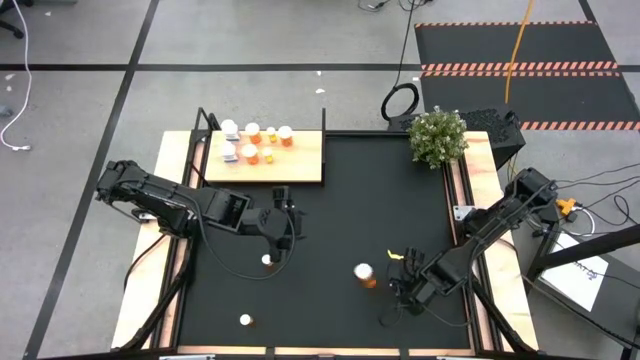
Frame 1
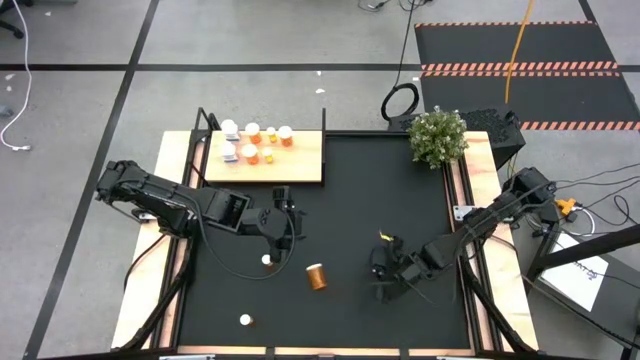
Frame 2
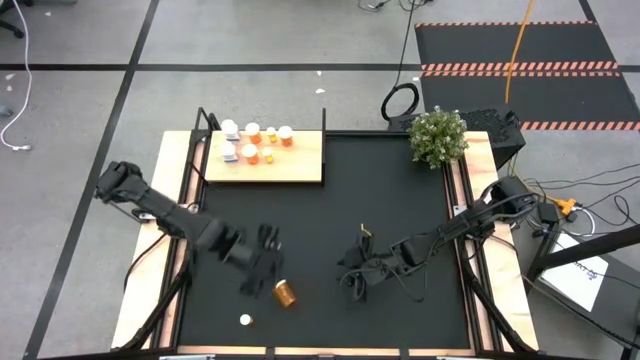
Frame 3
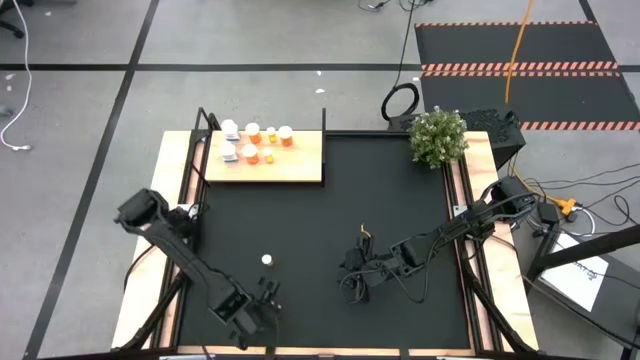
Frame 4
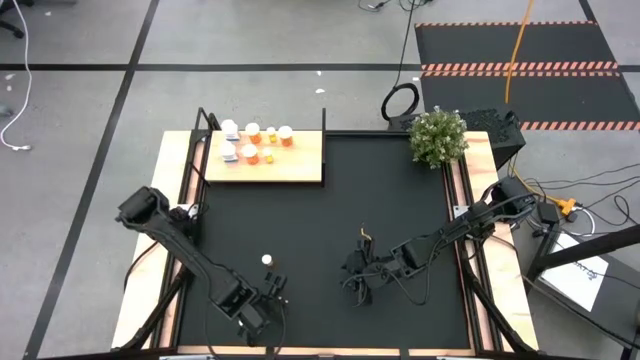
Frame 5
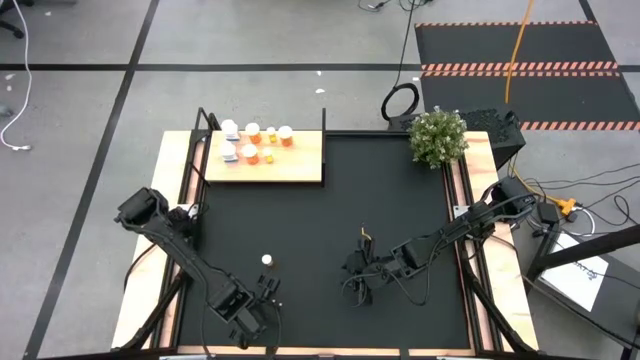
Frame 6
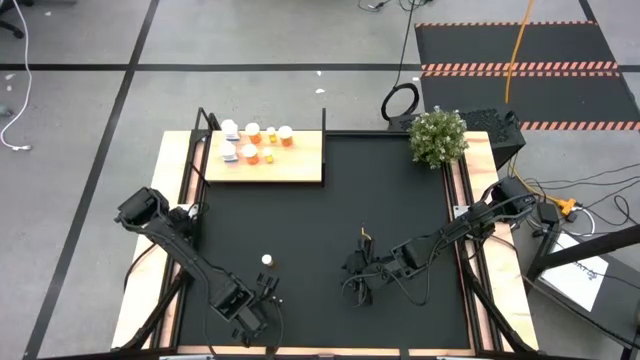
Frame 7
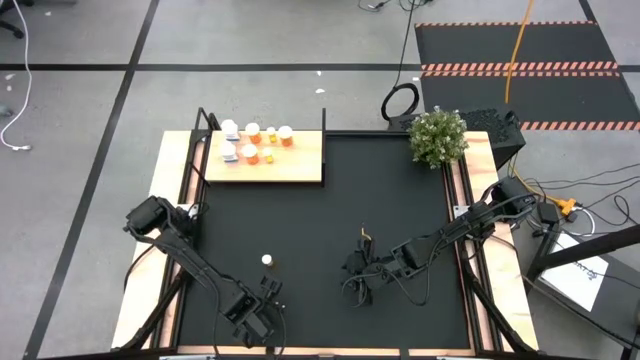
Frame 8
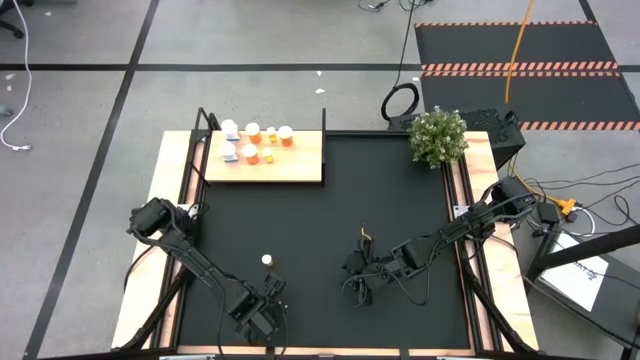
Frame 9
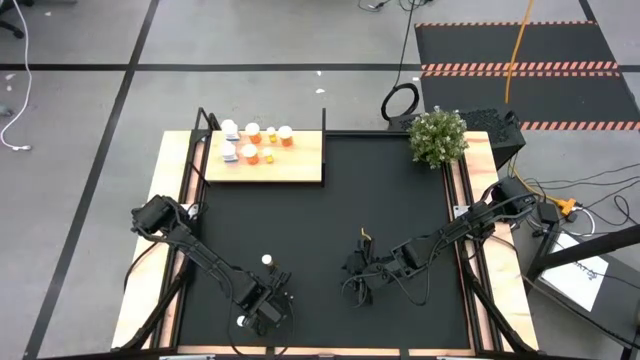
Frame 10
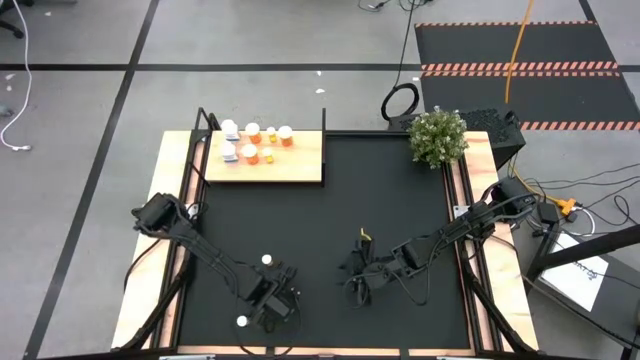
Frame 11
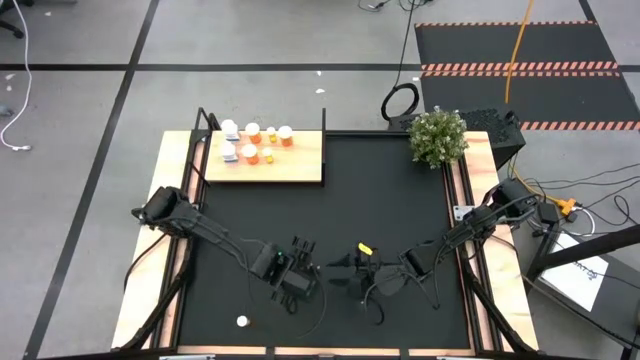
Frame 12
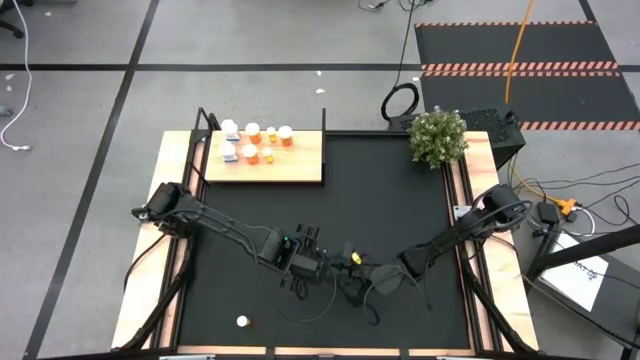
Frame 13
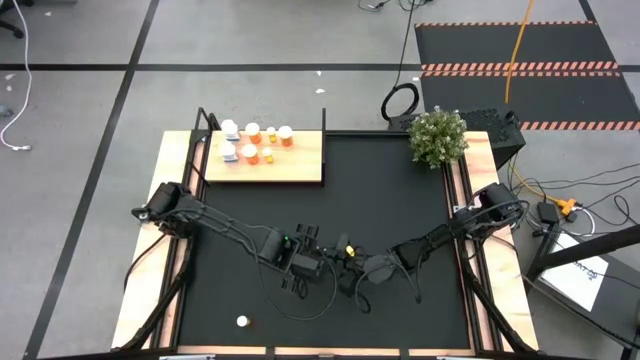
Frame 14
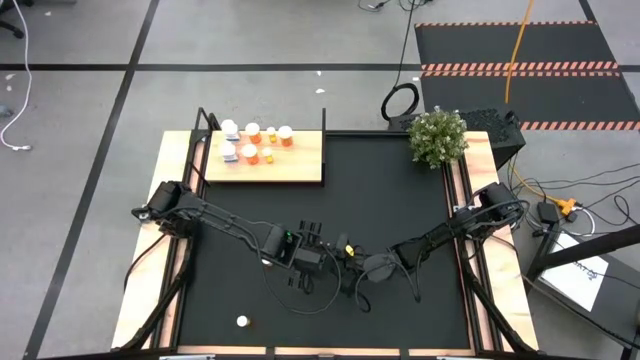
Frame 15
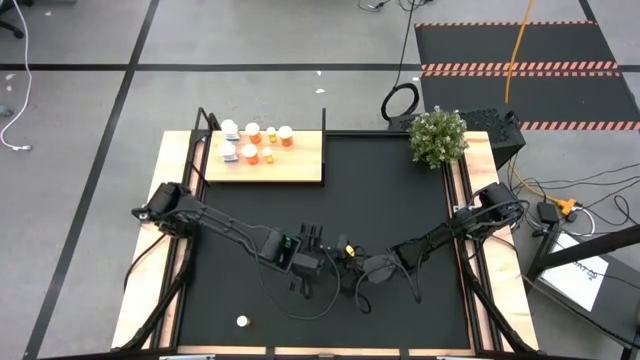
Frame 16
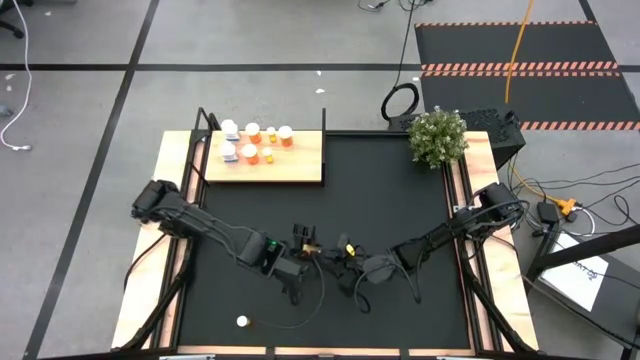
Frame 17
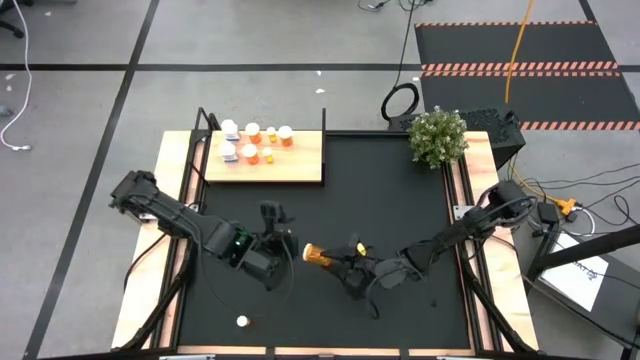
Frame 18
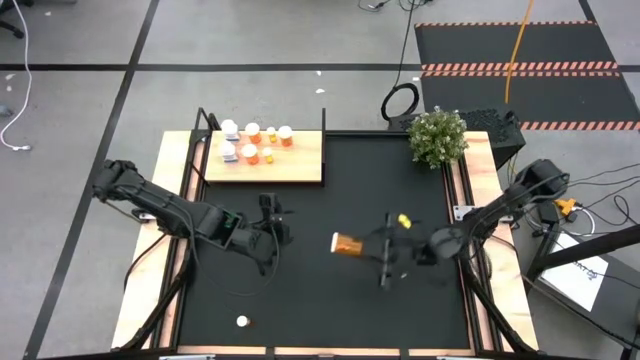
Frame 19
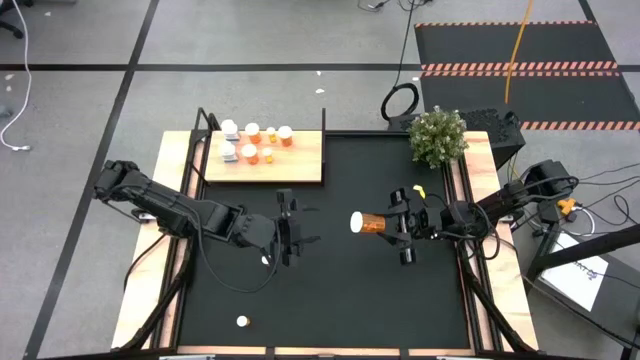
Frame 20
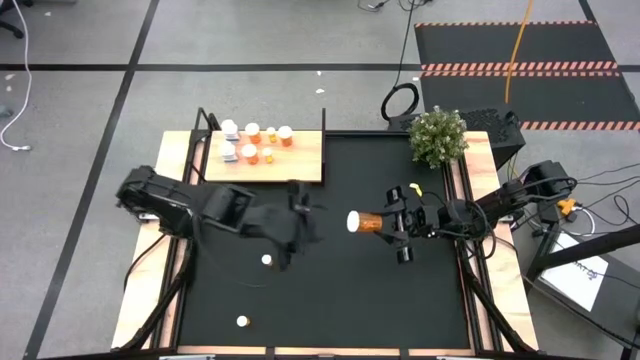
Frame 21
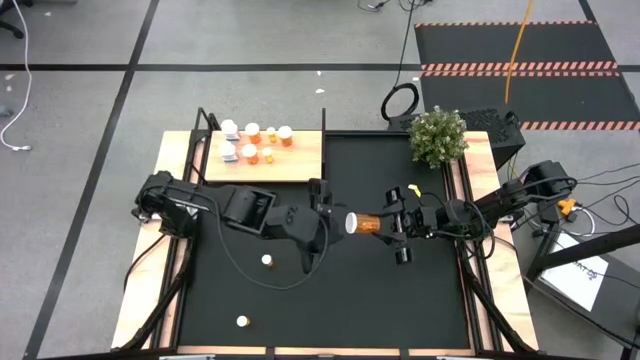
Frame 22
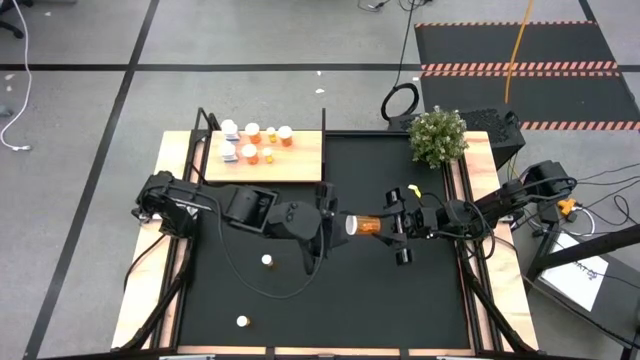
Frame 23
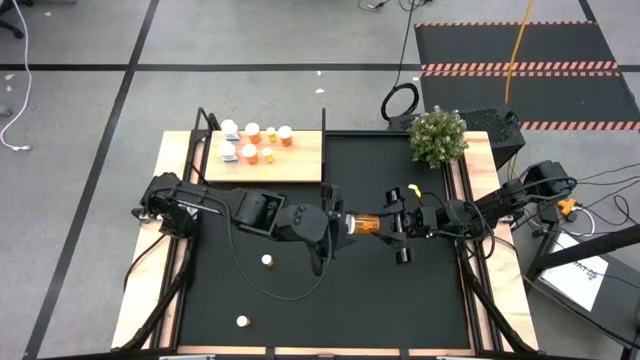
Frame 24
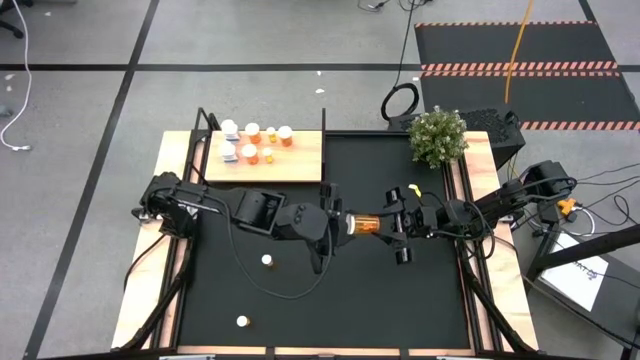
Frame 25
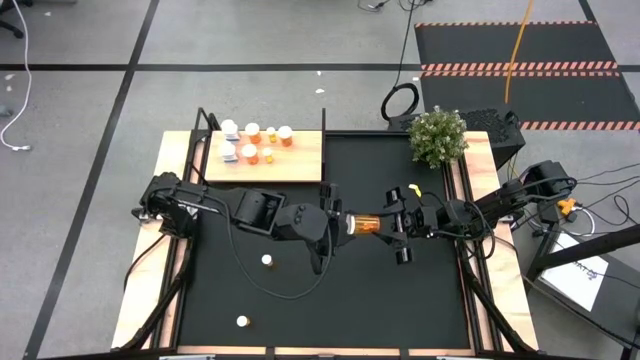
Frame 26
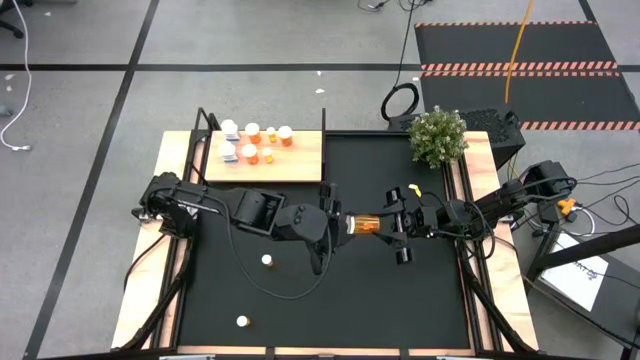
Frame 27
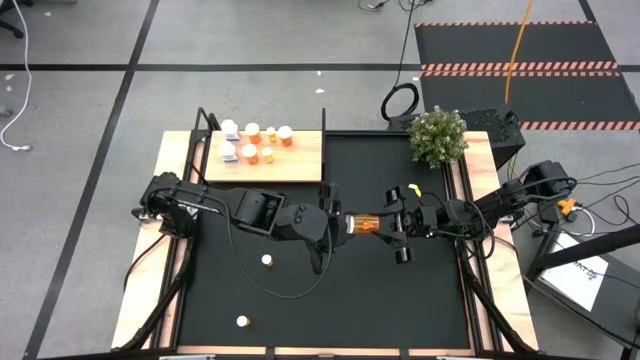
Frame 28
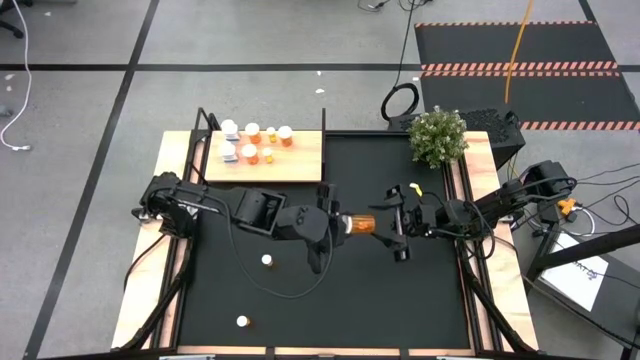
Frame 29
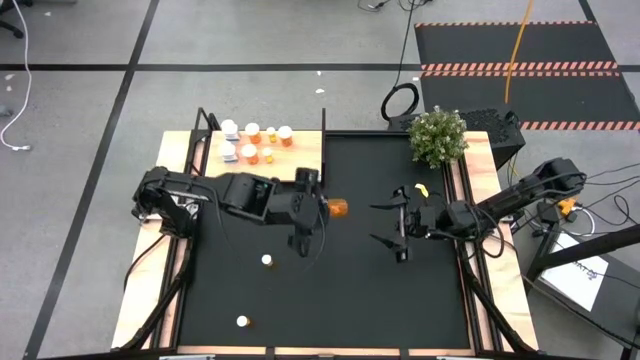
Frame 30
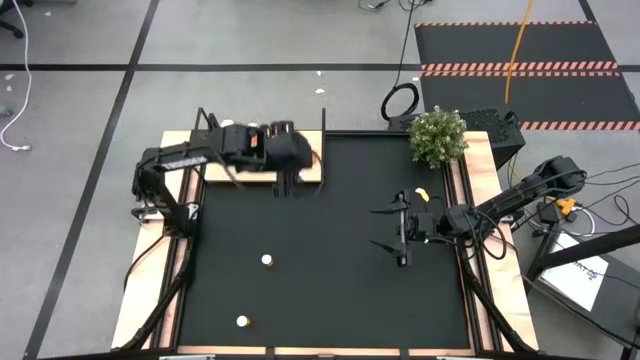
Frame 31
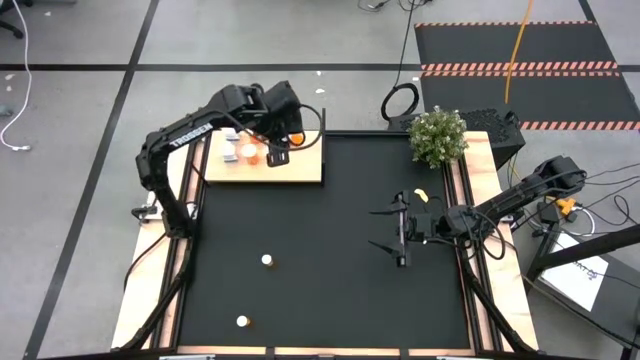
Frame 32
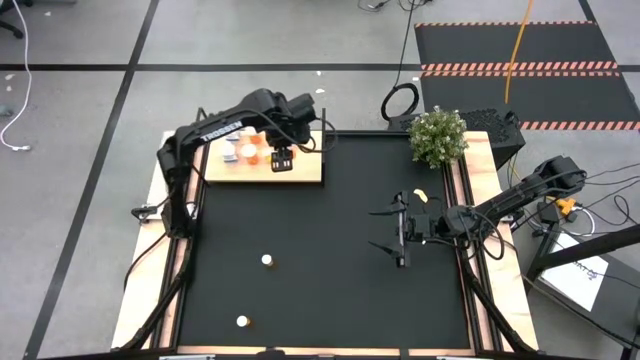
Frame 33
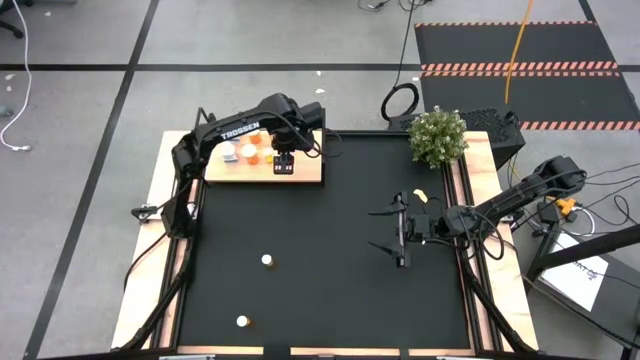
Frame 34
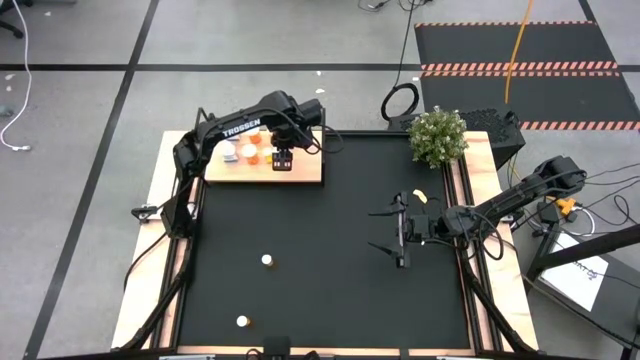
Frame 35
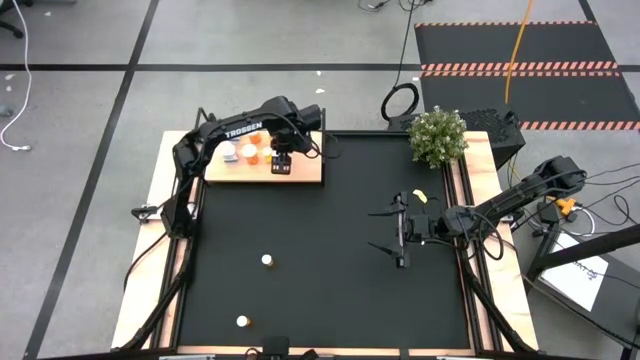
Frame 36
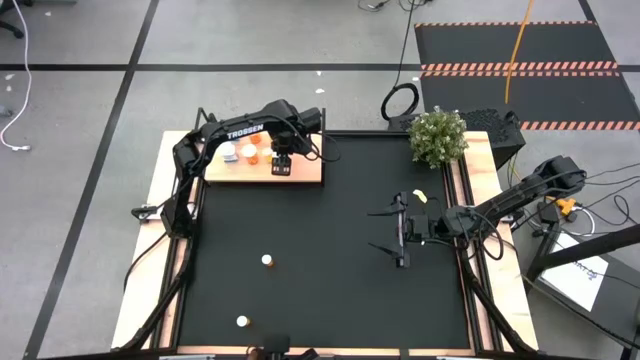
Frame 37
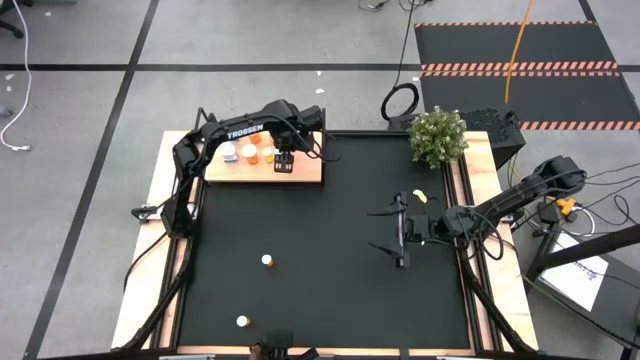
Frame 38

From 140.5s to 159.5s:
Task: Pick and place medicine bottles onto shelf by color
Put the large orange pill bottle on the shelf aligned with the other large orange pill bottle on the shelf

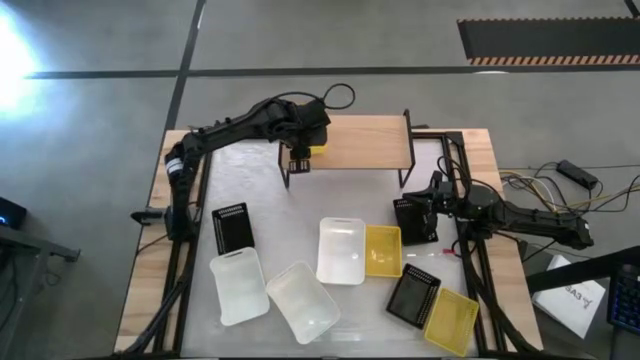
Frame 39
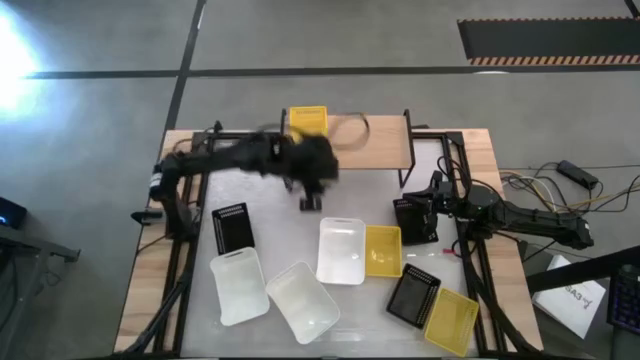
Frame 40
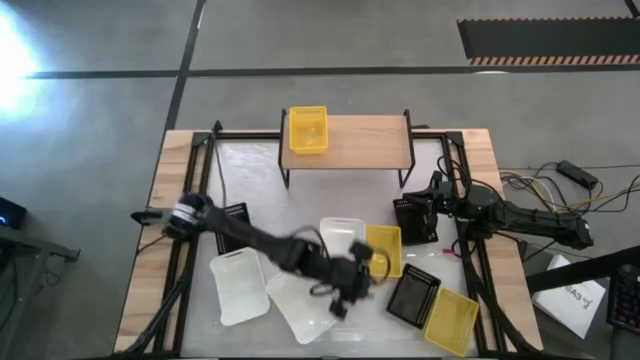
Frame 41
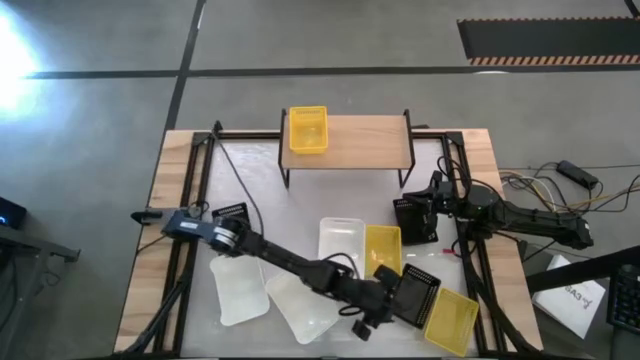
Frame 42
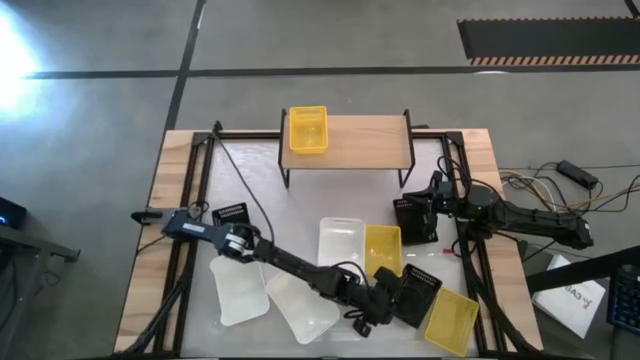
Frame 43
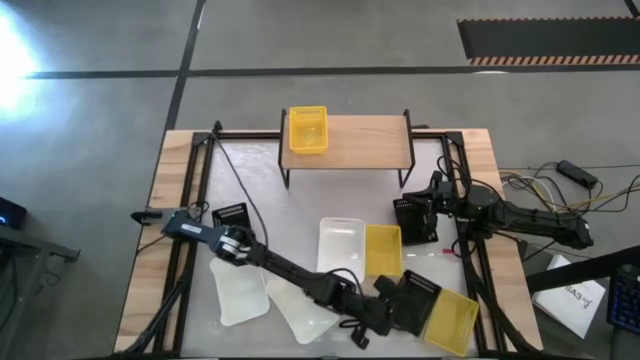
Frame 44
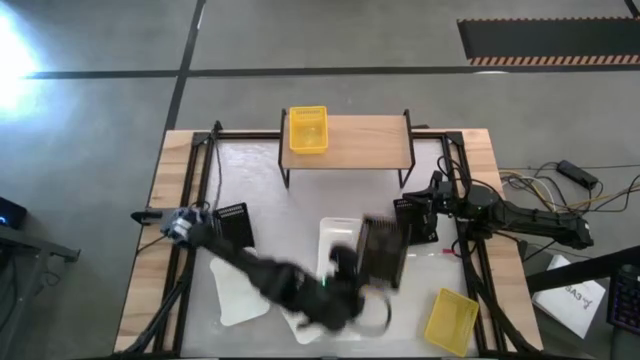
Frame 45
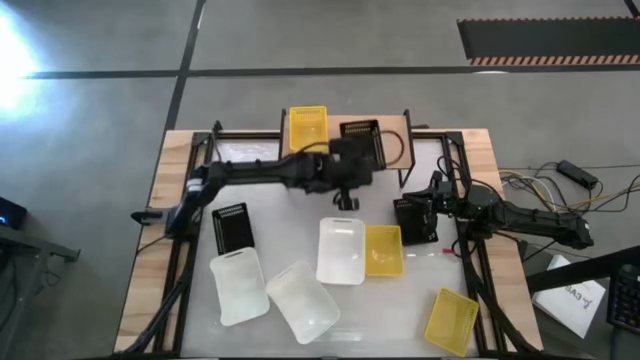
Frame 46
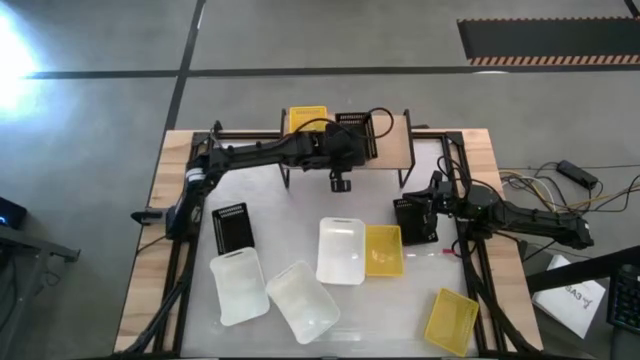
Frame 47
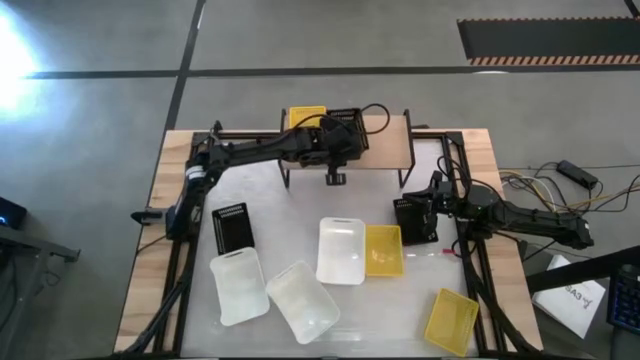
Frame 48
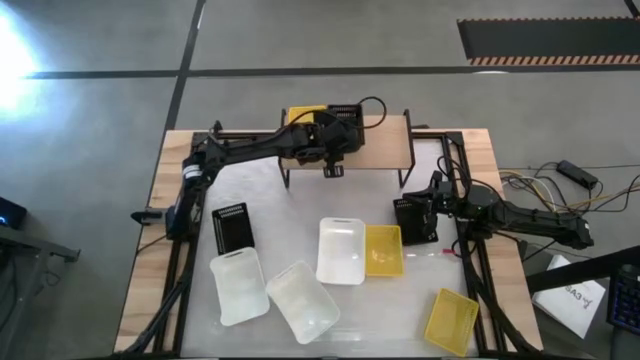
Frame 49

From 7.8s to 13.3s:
Task: Stack baskets on shelf by color
Put the bottom black bin on the shelf
